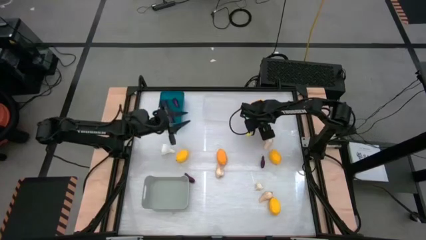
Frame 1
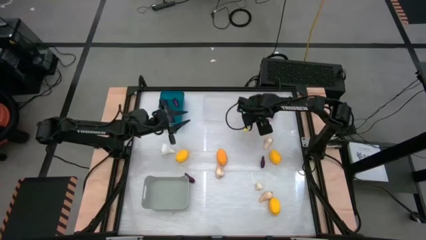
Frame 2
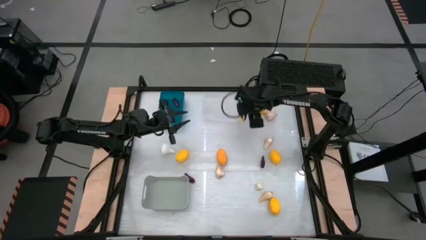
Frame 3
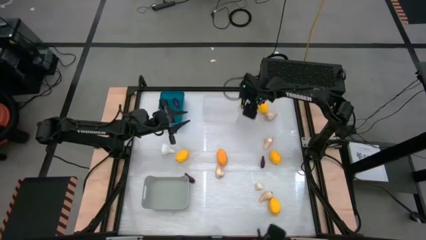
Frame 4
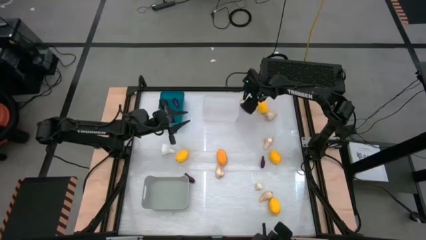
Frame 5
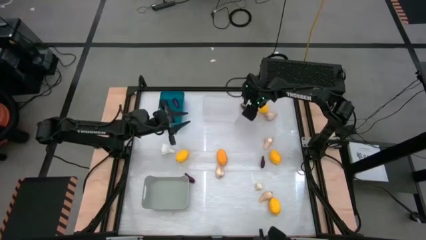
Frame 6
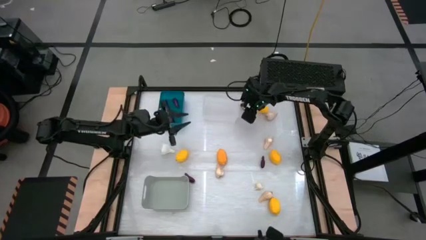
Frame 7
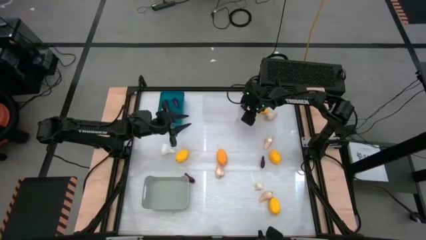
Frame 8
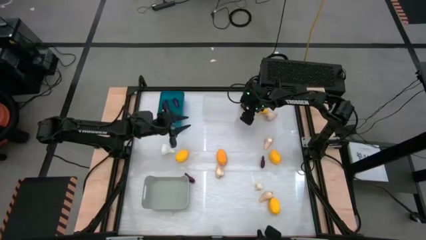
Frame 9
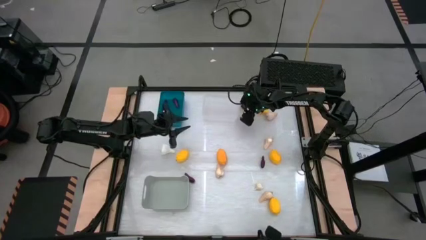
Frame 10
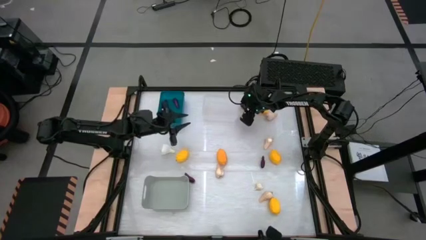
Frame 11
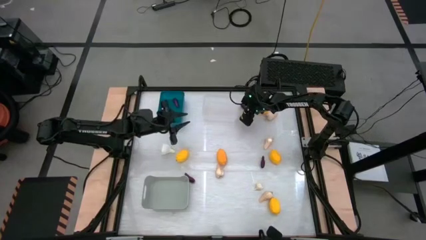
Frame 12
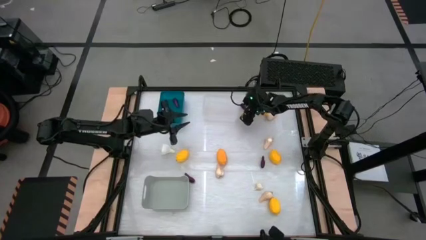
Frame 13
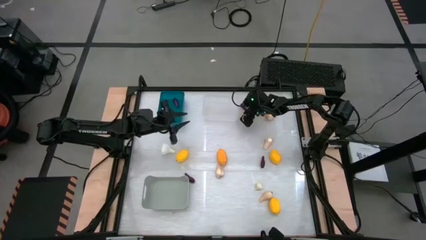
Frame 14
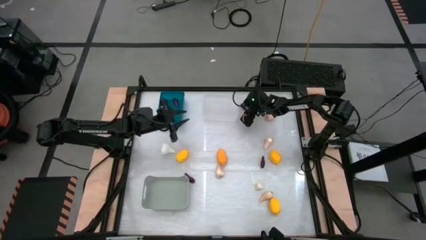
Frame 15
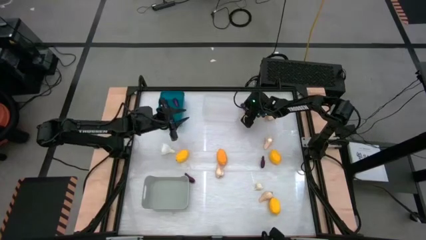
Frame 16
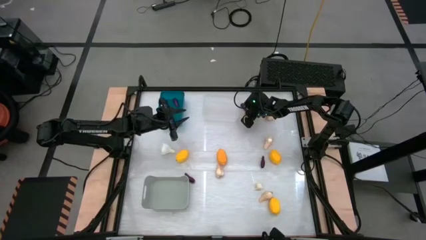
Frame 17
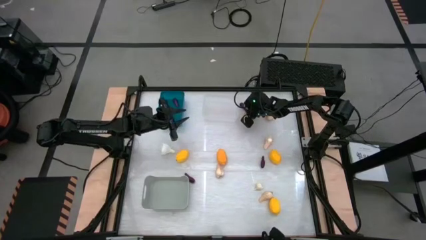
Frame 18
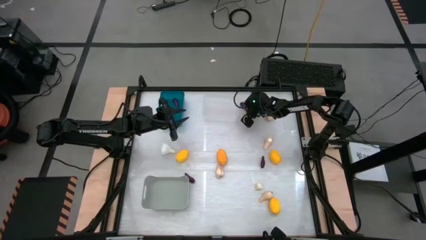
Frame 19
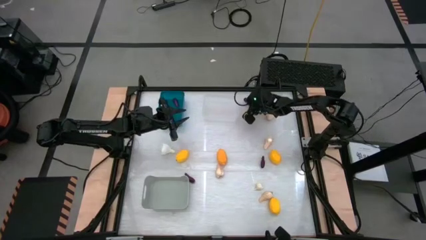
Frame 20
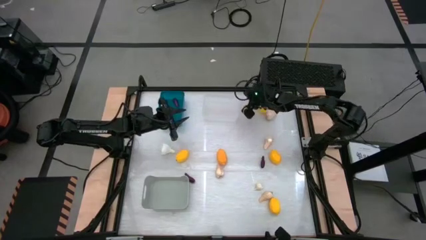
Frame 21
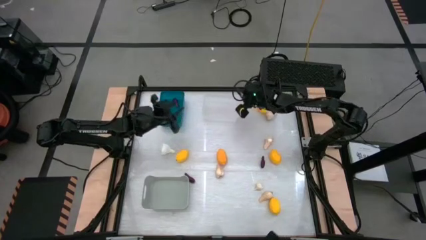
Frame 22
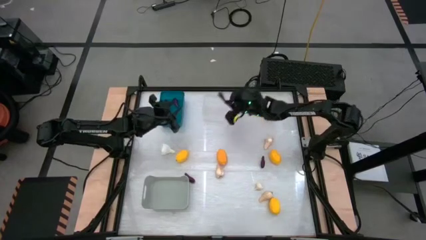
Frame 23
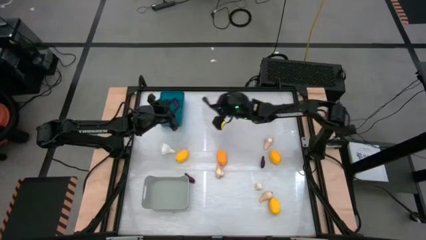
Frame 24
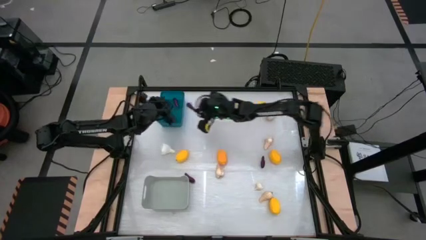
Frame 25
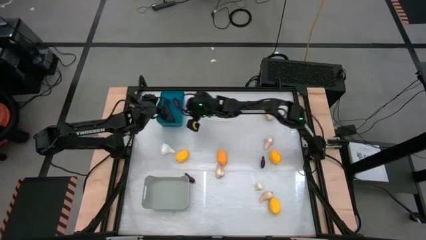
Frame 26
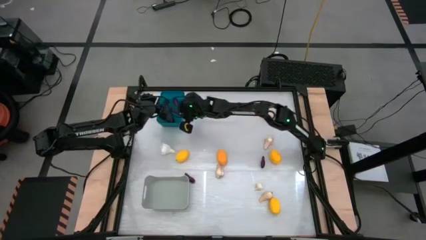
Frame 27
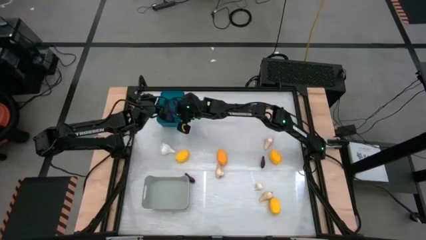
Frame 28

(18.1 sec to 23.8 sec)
Task: Sort produce into baskets
Put the eggplant into the blue bin

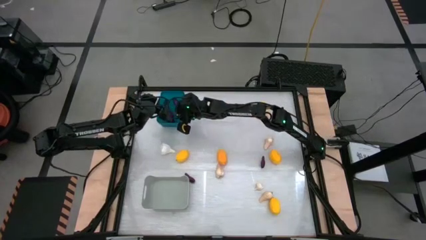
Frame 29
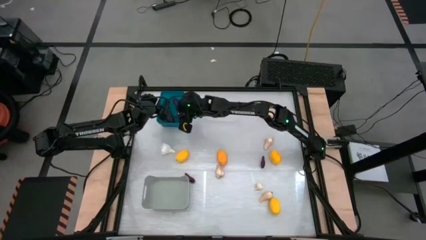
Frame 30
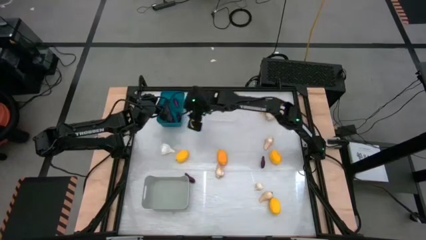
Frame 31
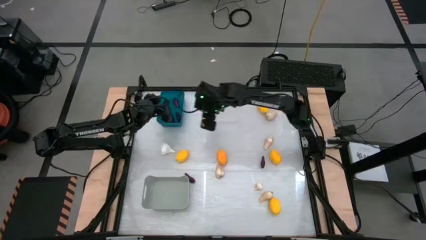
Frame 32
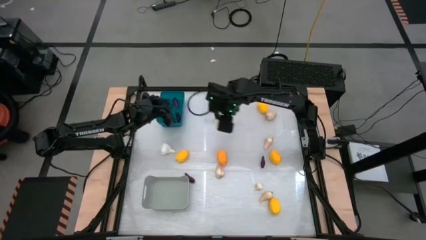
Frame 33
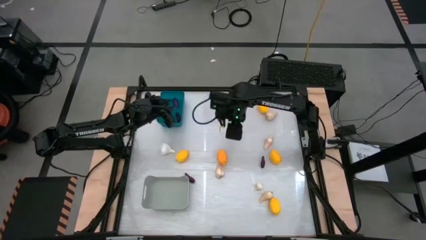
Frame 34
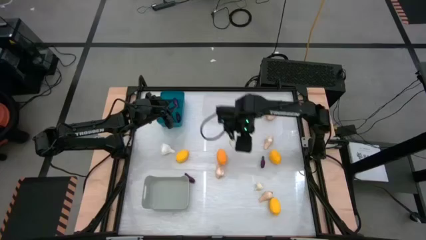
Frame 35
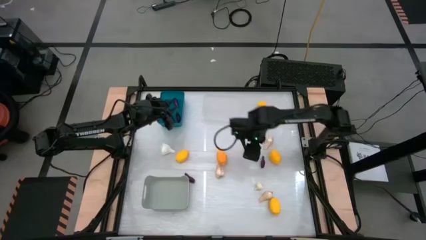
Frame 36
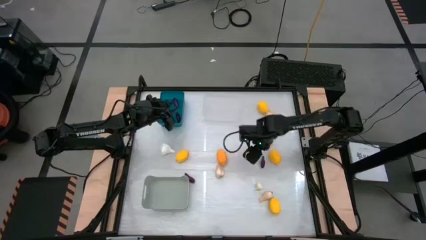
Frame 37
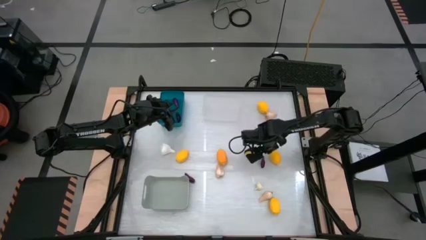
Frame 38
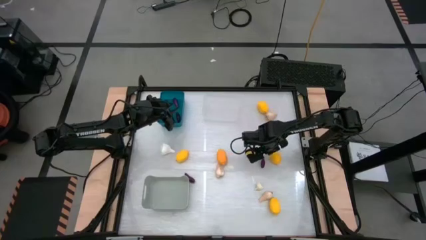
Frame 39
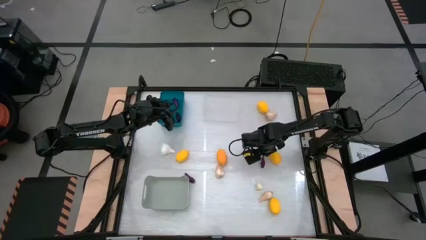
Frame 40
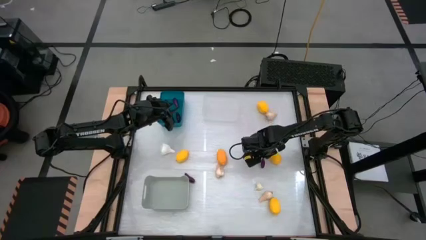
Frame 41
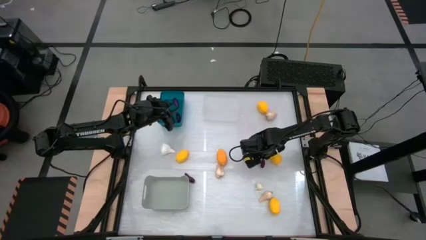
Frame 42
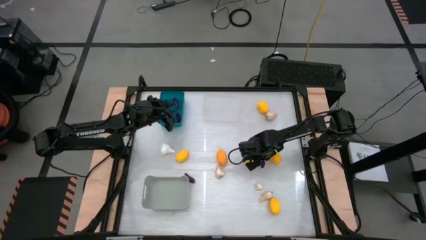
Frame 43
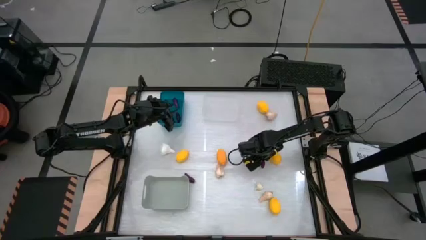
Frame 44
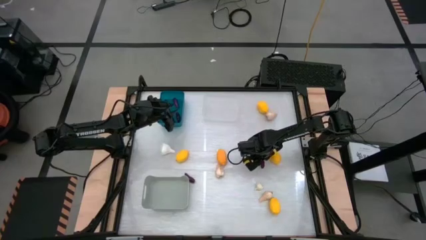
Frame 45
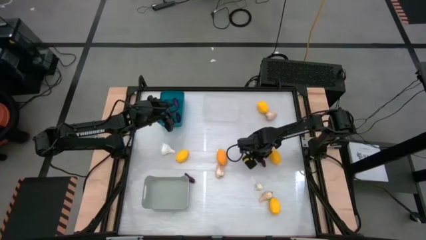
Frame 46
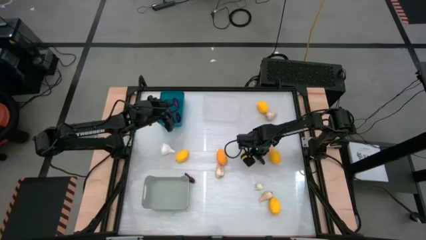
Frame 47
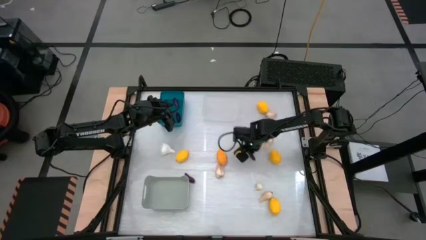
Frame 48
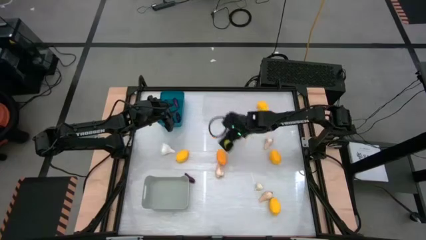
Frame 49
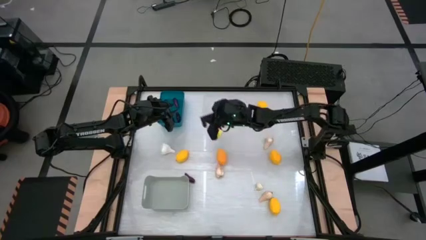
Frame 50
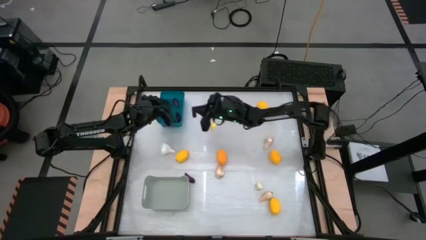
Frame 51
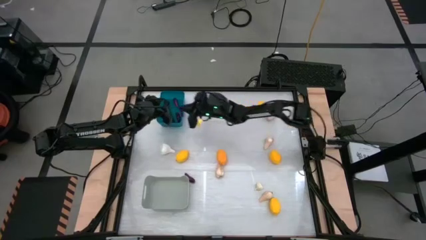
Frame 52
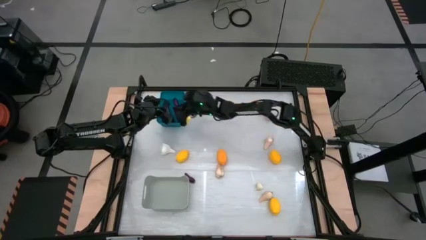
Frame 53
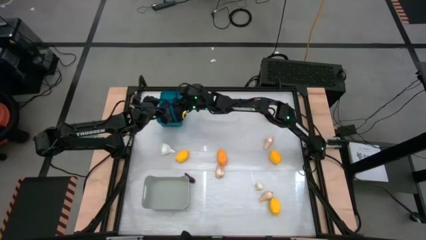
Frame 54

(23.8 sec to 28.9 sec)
Put the eggplant into the blue bin

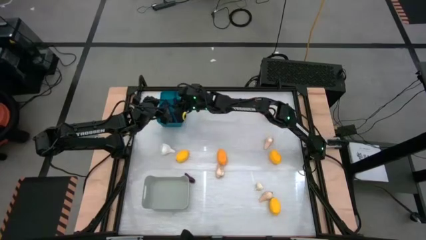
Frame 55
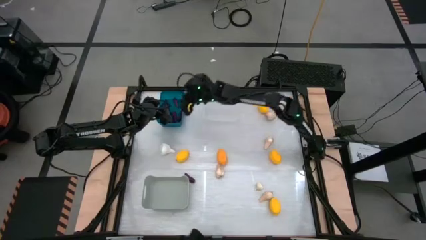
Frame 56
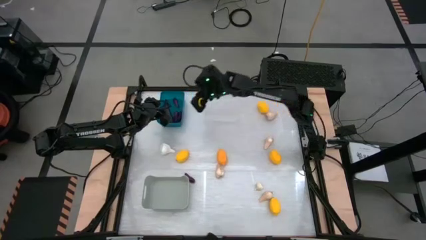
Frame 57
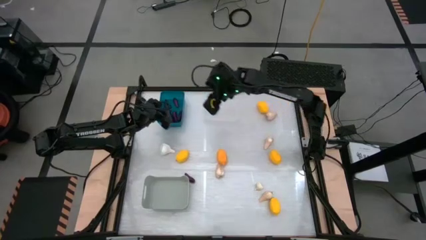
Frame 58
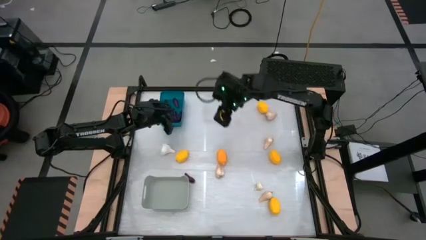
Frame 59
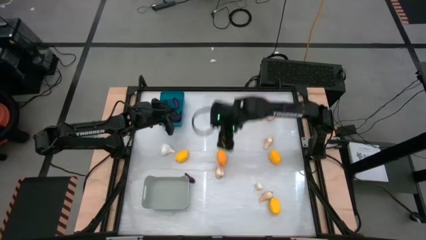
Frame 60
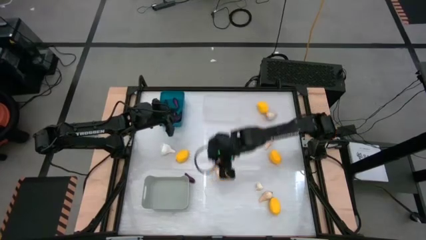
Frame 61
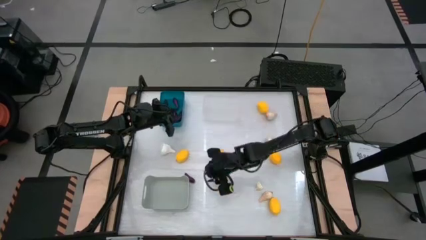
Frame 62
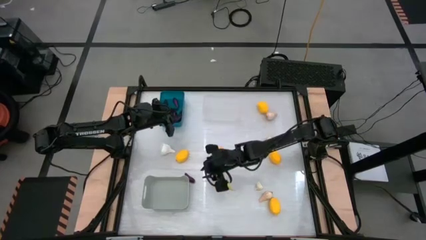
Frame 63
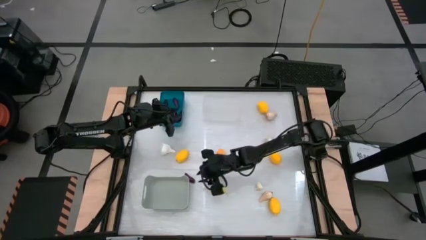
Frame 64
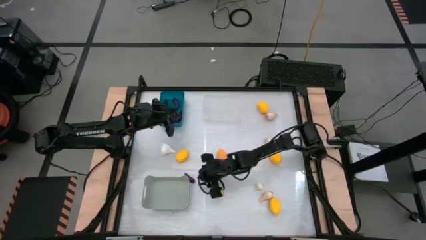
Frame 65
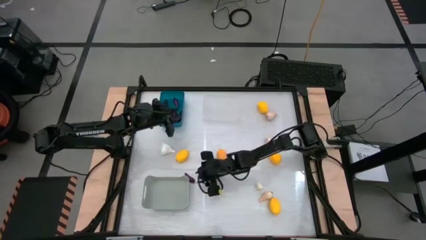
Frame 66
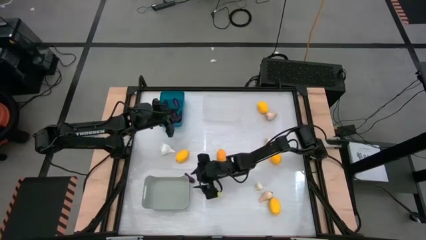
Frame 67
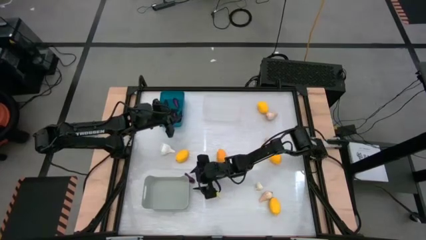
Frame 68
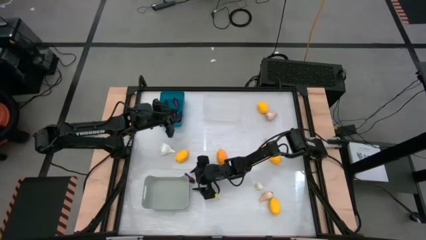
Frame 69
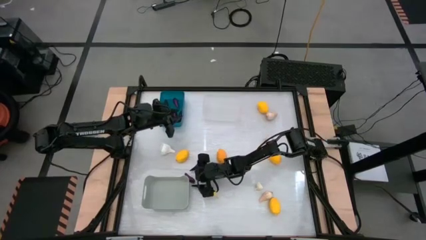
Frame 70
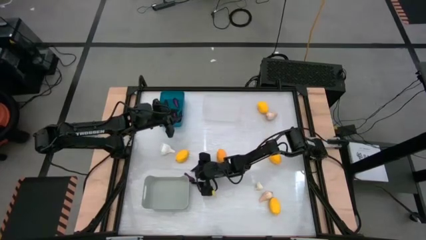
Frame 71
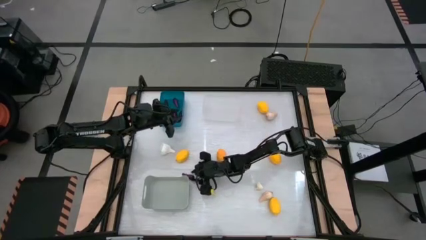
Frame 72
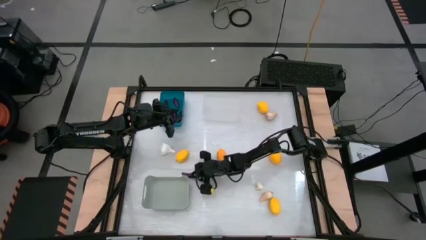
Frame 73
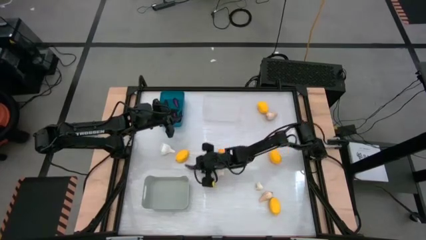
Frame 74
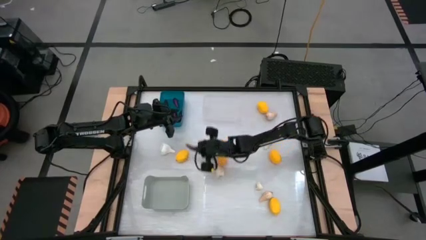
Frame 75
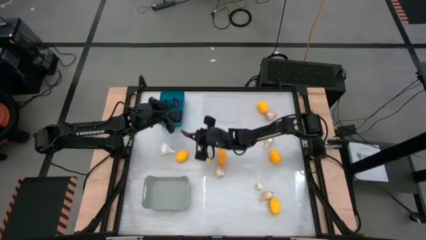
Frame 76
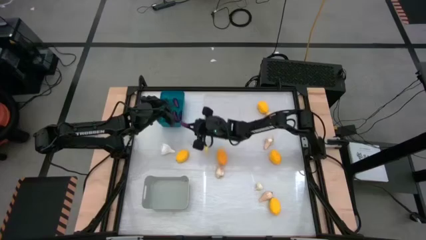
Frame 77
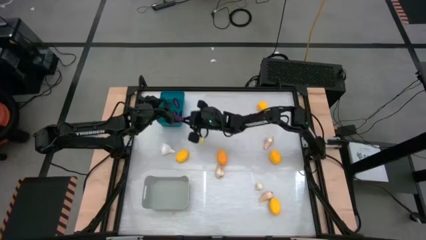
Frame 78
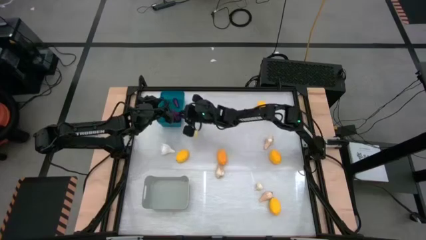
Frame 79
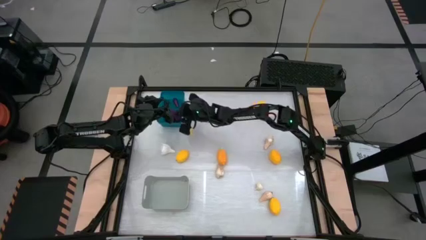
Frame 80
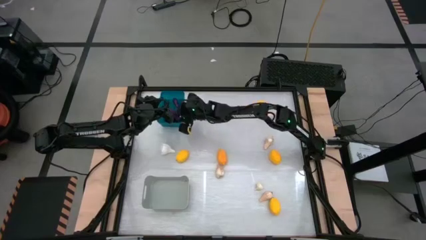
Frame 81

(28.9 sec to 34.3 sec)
Put the eggplant into the blue bin
